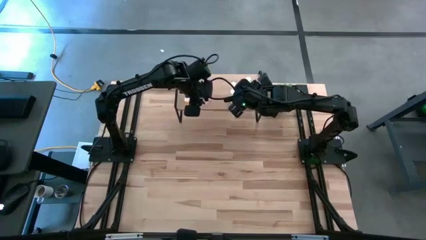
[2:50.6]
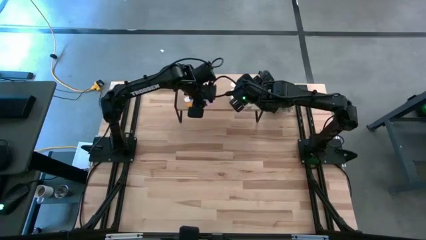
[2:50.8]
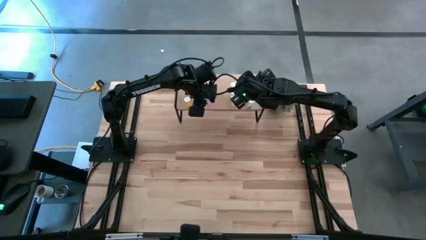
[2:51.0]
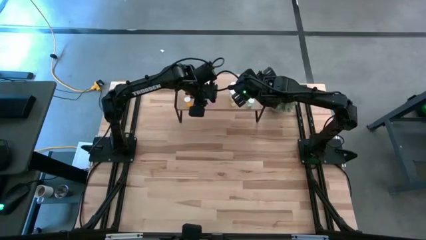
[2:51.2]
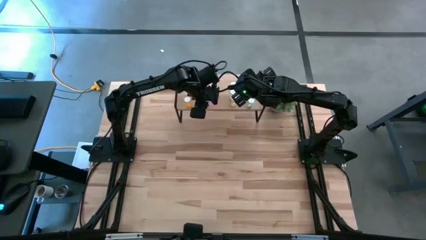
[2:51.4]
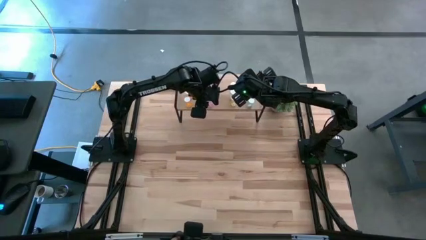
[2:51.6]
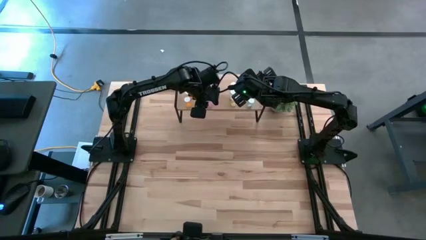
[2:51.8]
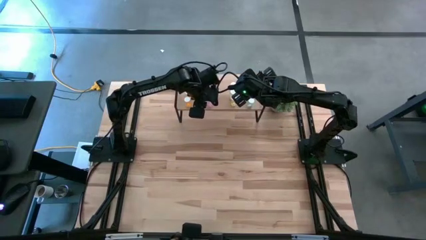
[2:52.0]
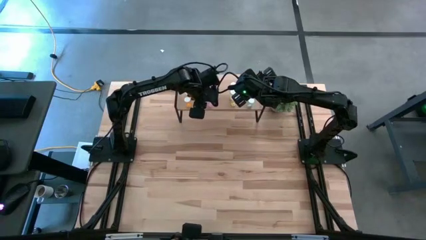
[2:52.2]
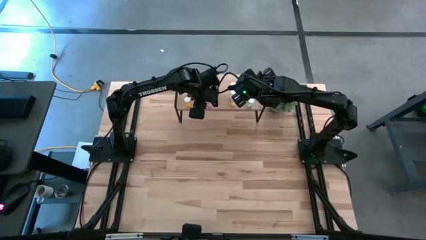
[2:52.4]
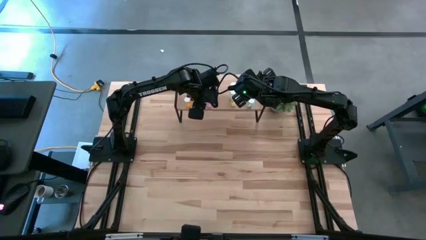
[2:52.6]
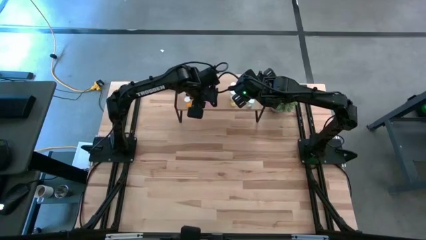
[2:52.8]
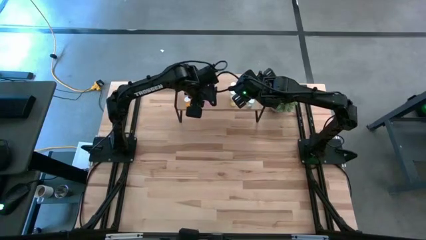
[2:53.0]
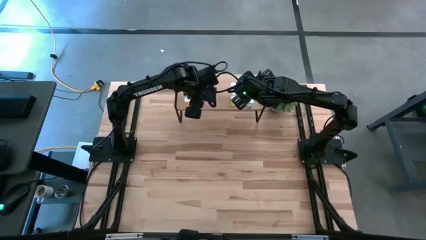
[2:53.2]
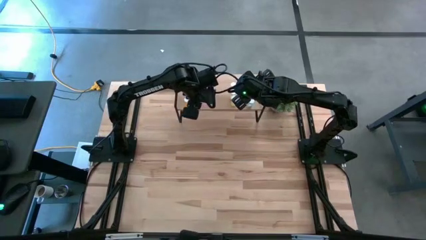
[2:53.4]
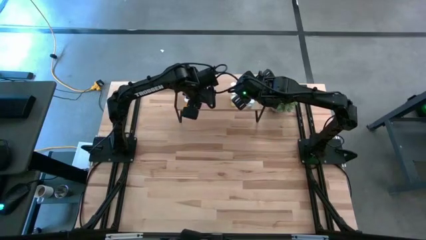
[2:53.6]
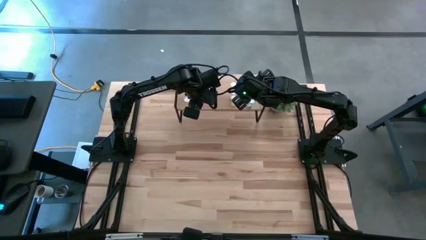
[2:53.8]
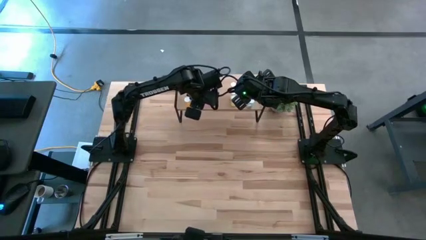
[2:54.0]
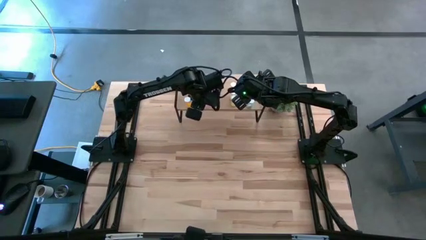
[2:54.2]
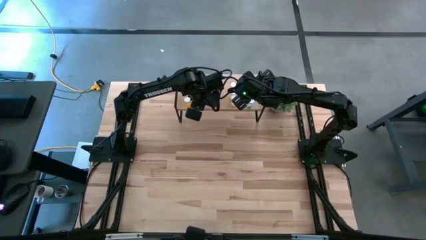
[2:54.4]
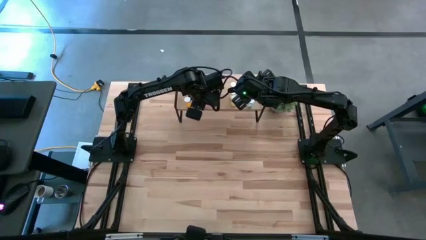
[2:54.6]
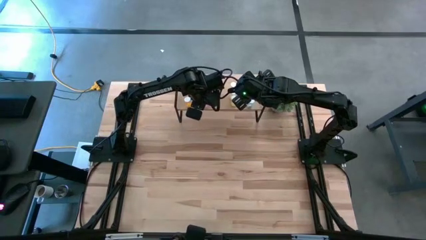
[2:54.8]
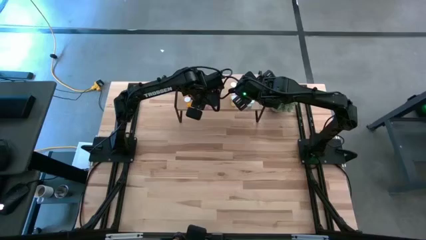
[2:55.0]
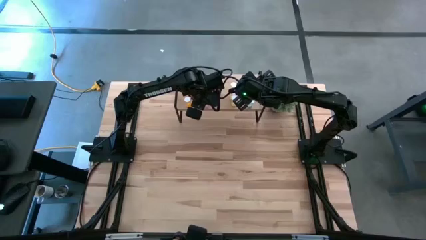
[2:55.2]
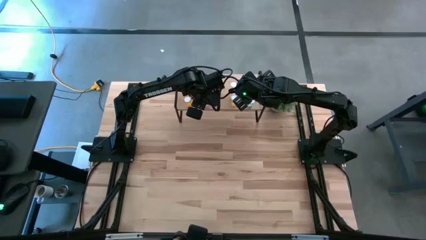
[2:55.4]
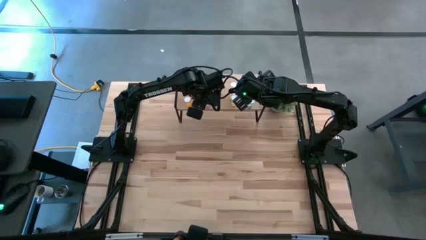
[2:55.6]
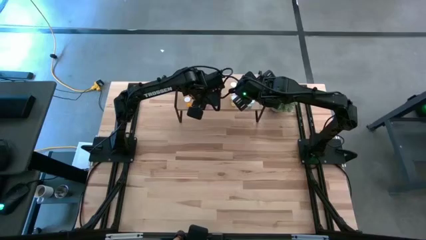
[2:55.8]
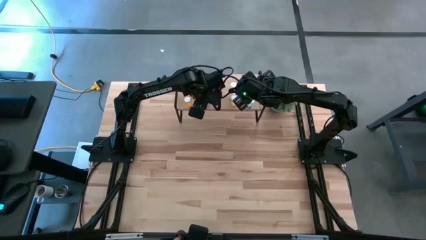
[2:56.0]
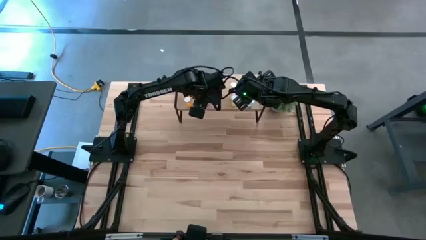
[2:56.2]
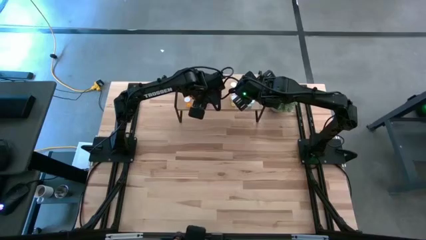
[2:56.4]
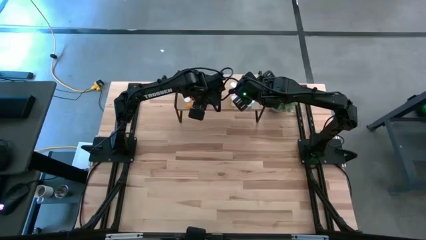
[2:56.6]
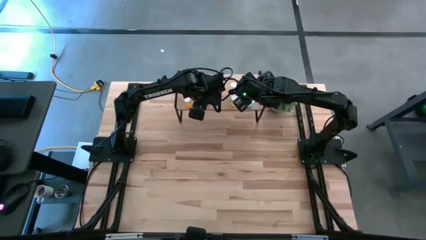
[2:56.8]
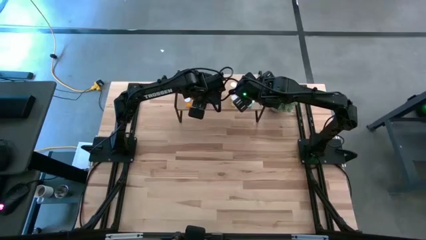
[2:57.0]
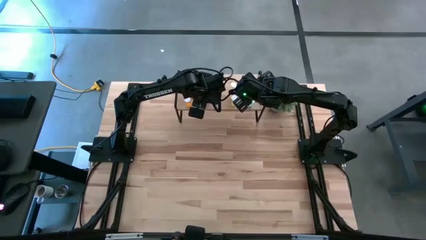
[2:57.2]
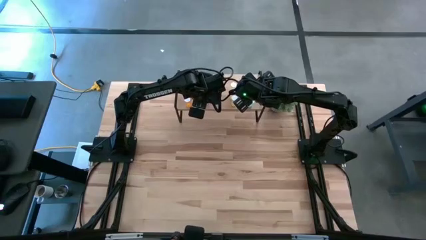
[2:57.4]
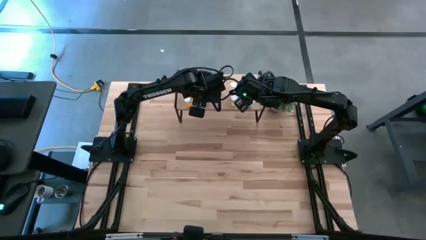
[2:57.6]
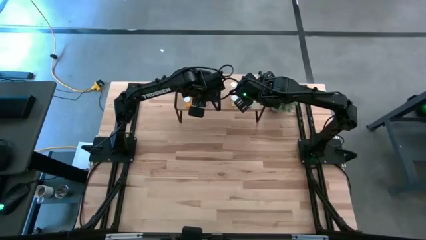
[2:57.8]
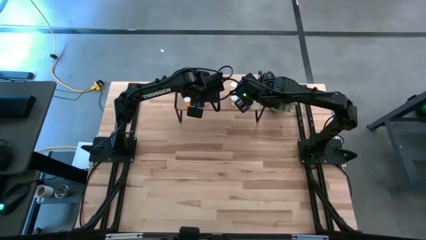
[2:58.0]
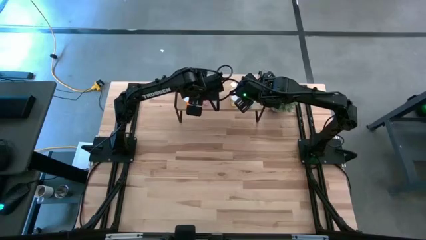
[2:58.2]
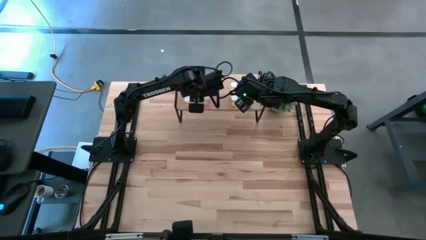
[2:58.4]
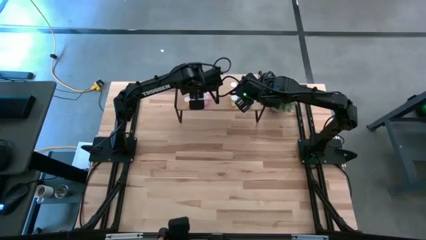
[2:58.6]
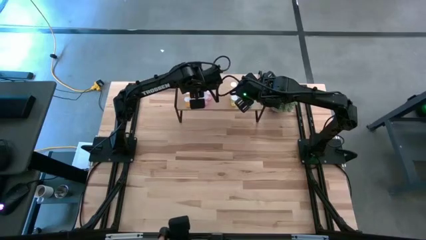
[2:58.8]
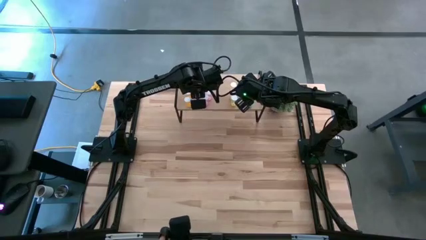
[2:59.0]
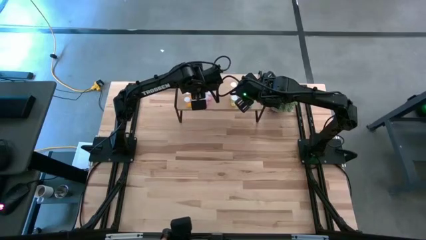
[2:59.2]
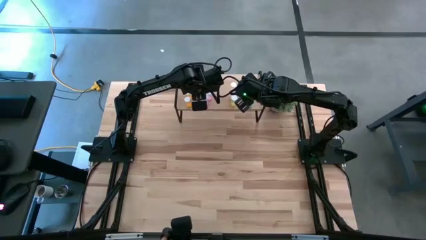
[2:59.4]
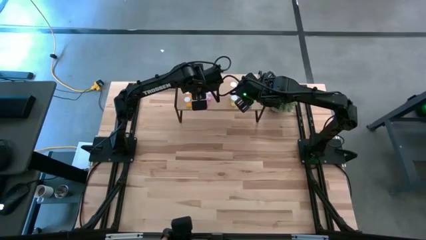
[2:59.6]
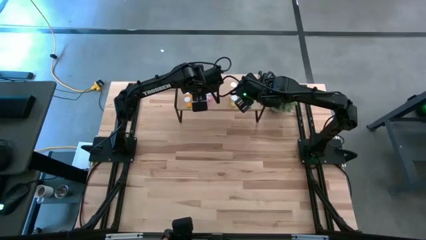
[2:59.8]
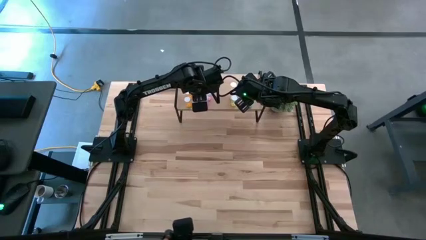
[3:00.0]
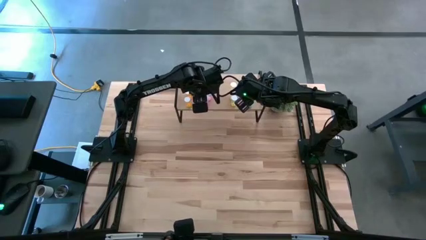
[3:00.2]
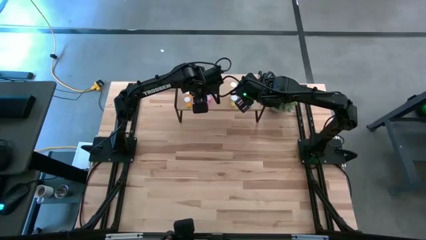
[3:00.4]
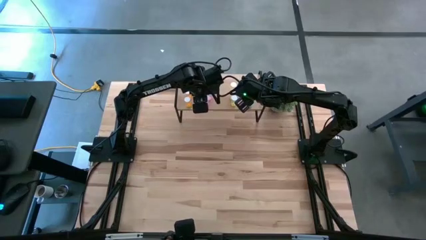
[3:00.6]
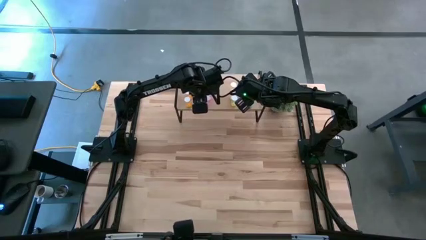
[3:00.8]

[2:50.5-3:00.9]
Task: Pick and place medicine bottles onto shelf by color
Put the pink pill bottle on the shelf aligned with the other pink pill bottles

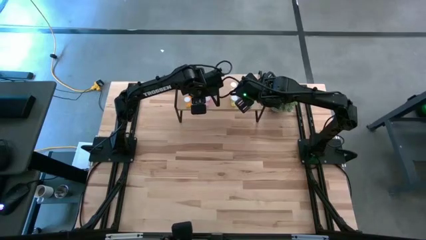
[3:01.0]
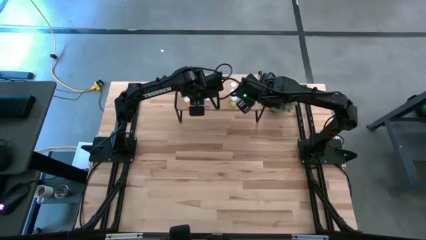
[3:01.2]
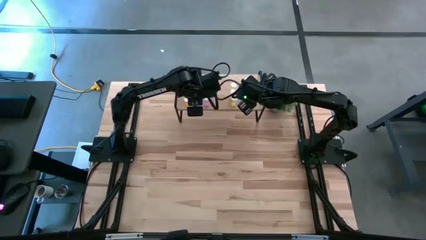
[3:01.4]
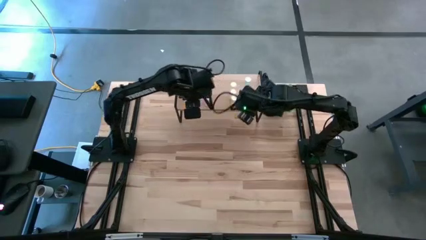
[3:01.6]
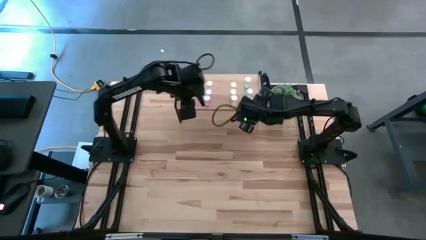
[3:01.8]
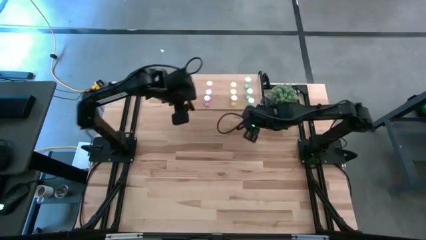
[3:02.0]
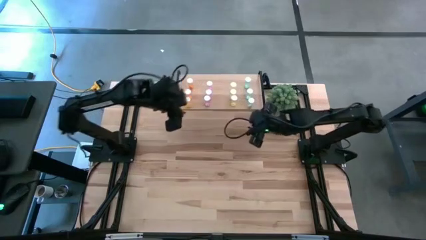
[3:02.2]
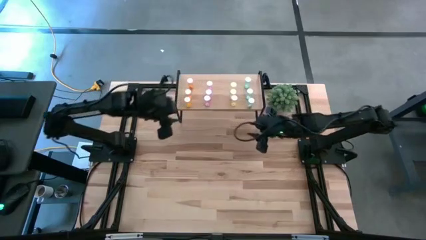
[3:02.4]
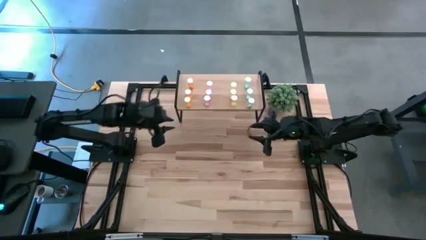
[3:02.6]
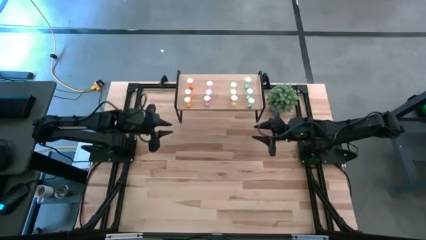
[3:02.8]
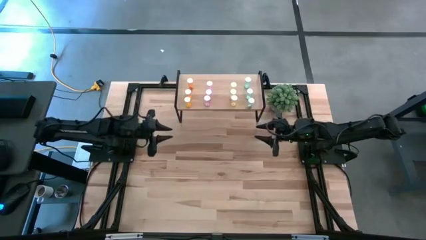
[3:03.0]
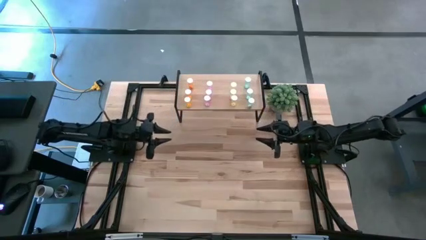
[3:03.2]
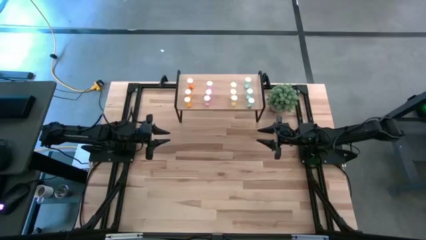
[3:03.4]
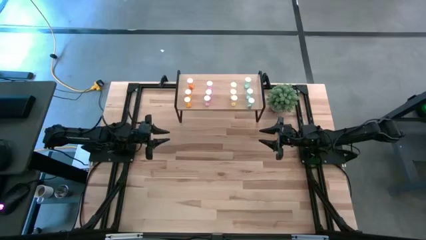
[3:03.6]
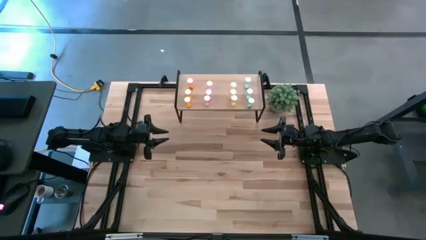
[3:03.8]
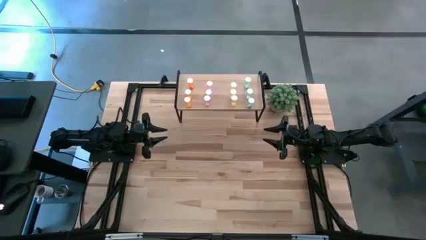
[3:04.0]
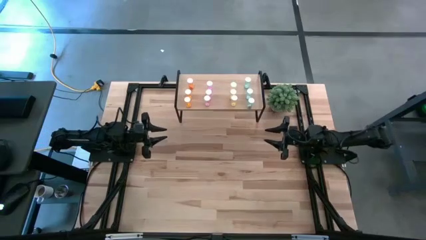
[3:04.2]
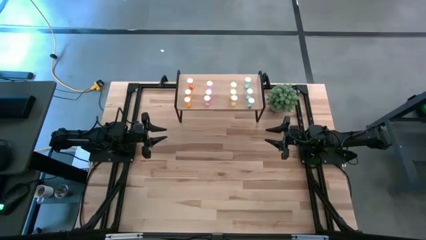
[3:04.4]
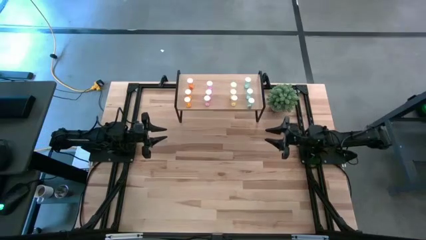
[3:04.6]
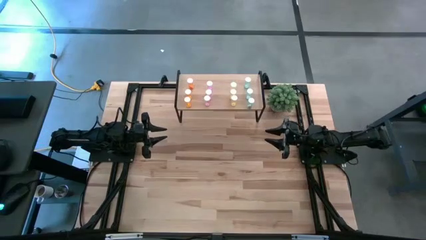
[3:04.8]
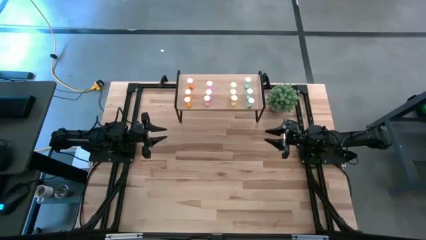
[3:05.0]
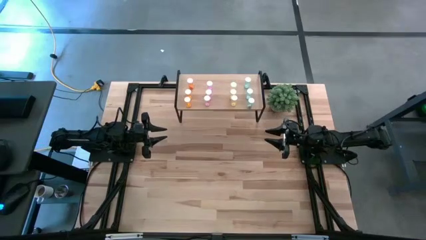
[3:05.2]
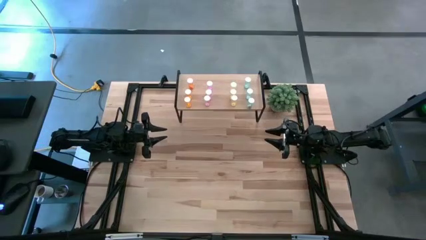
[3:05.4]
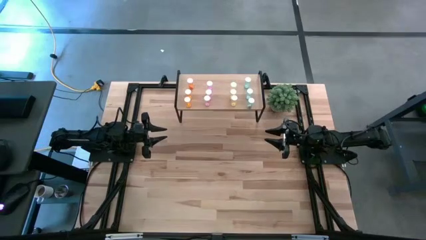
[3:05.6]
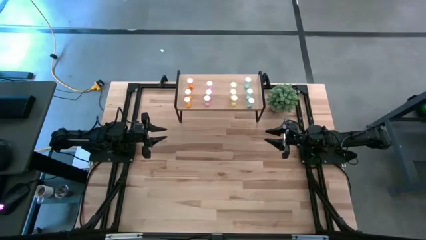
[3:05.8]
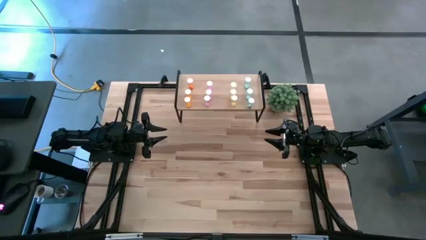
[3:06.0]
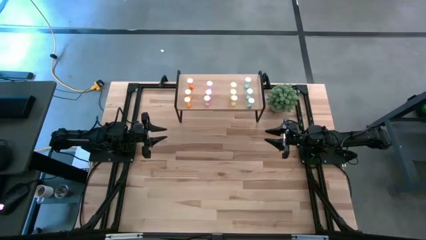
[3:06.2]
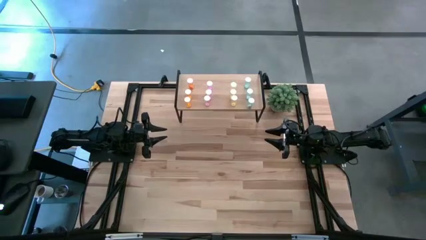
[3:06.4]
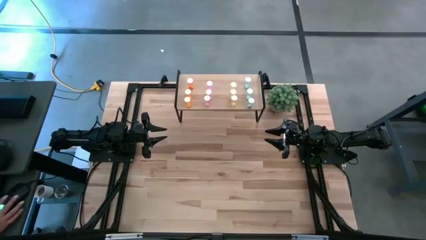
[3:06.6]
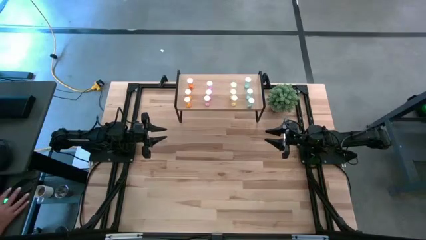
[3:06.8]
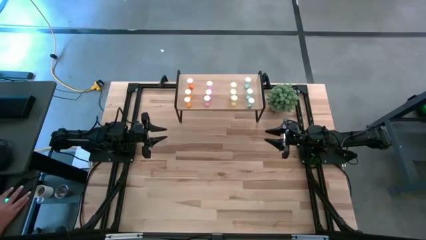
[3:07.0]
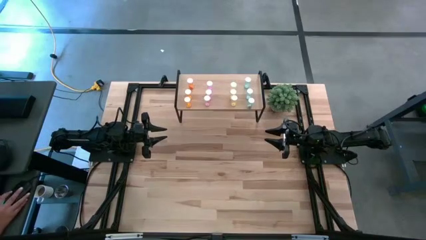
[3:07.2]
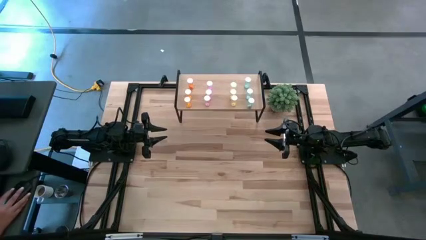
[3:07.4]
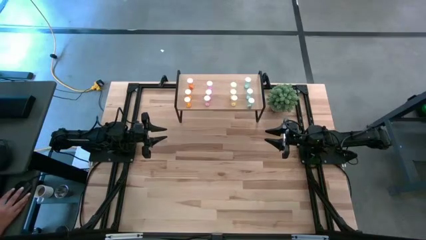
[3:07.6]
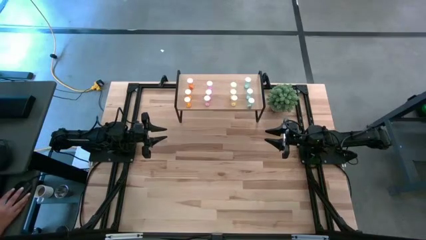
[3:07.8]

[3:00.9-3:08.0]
Return to Home Position
